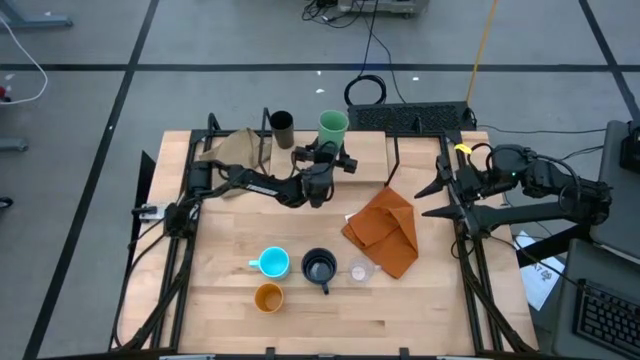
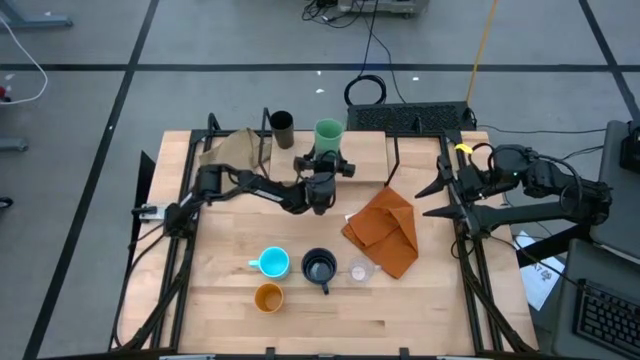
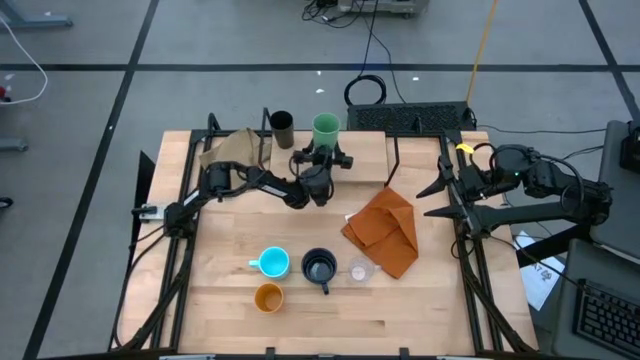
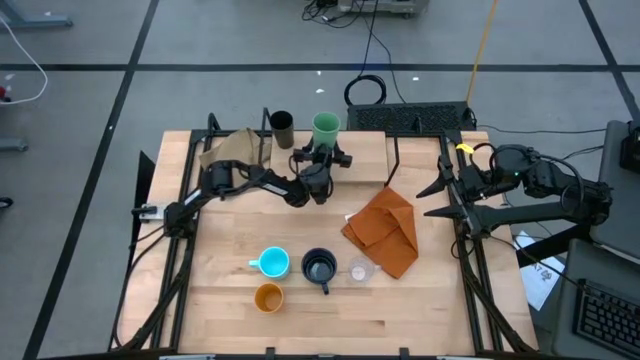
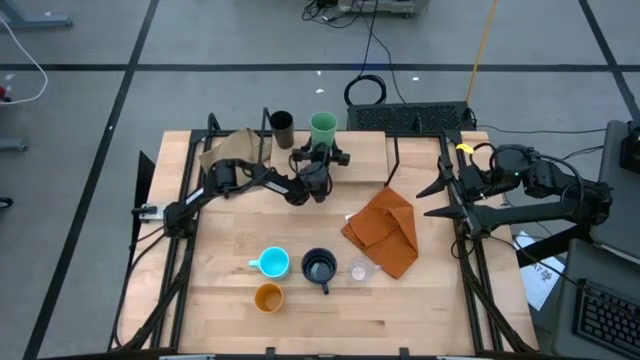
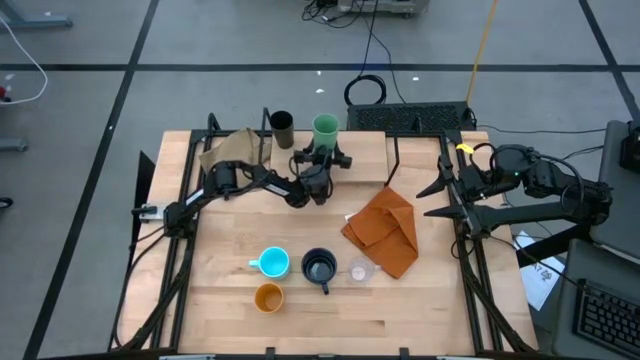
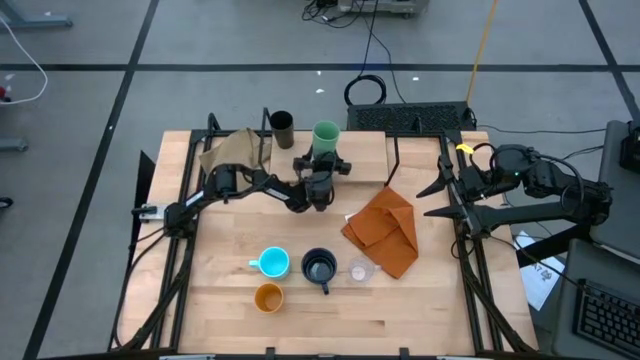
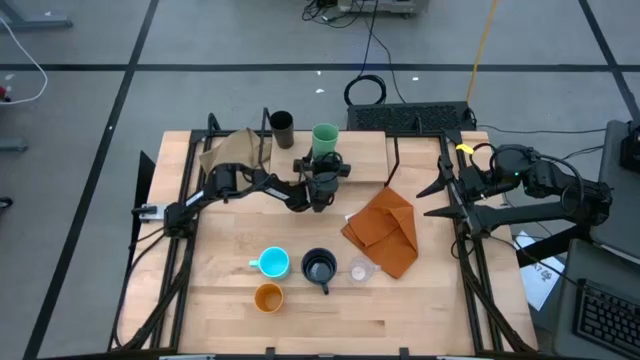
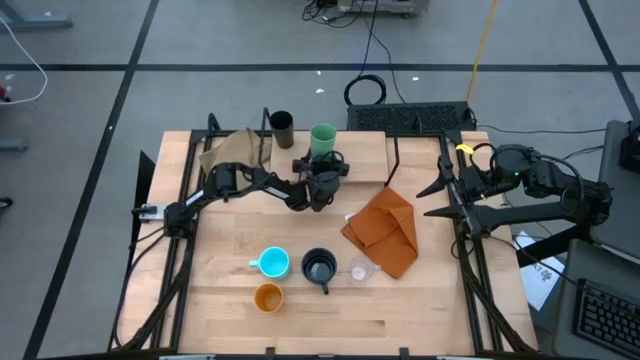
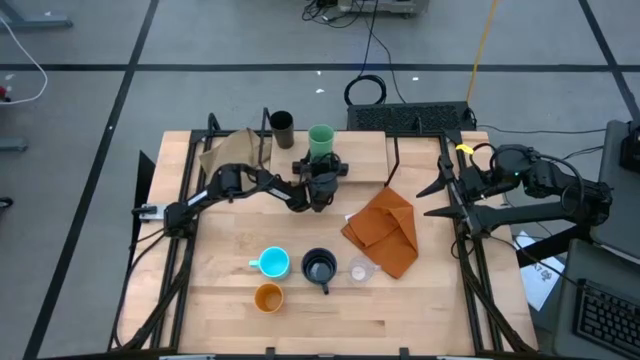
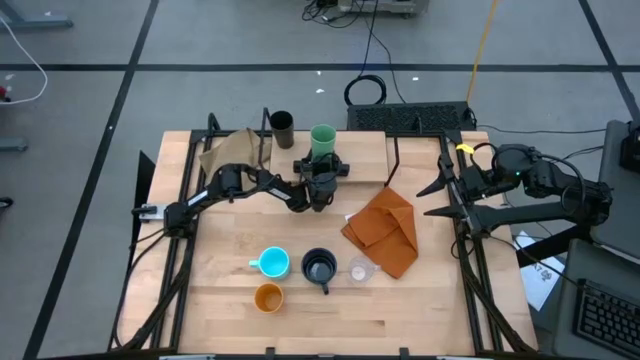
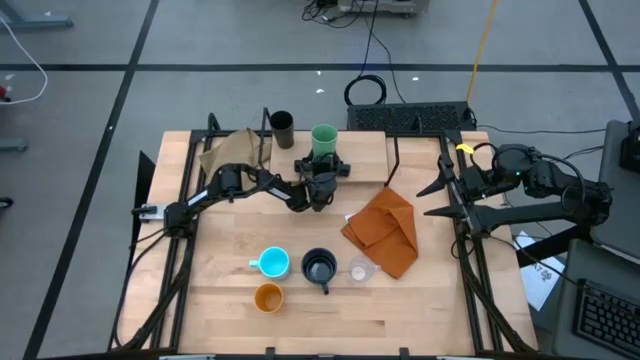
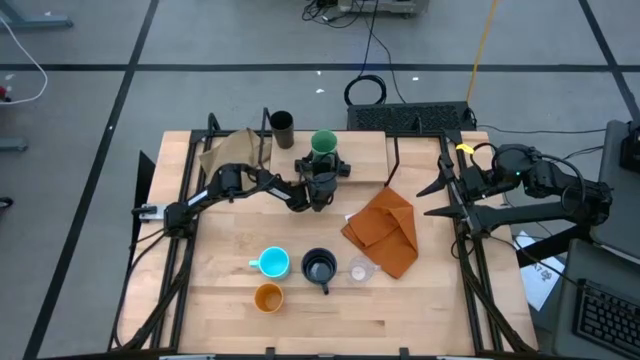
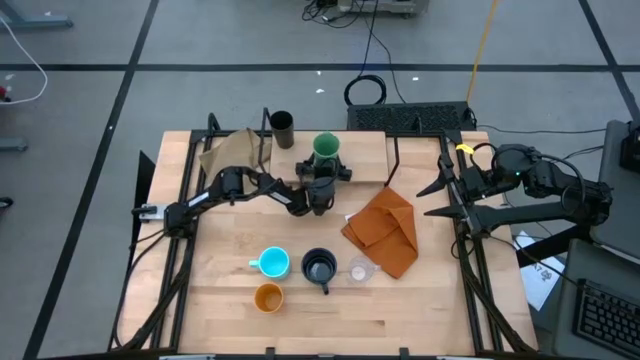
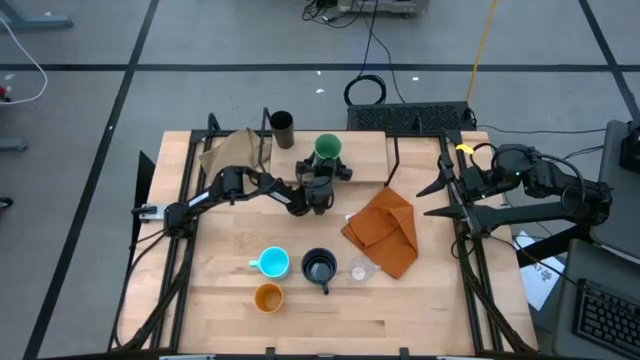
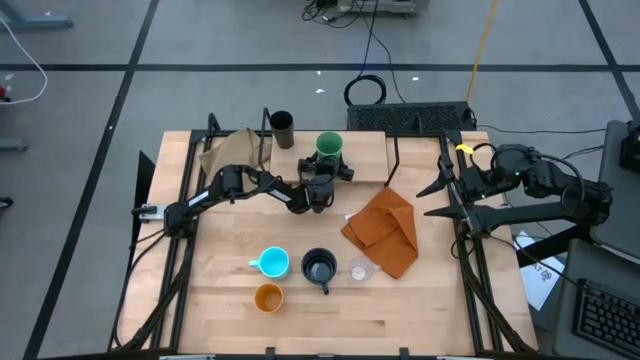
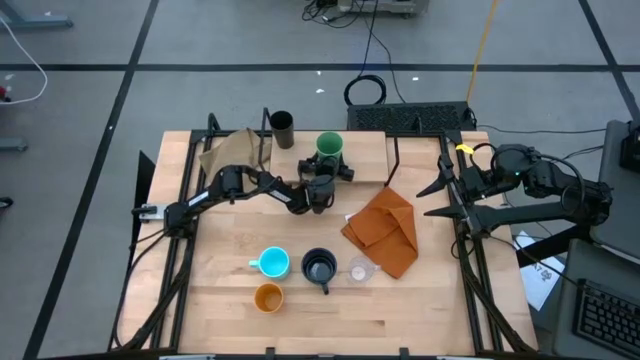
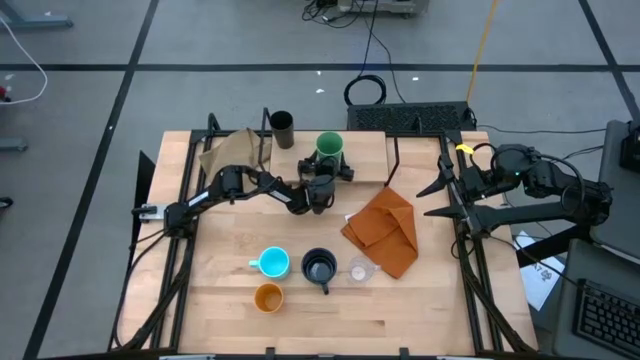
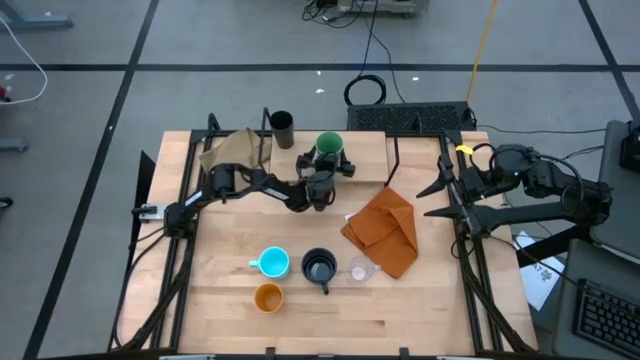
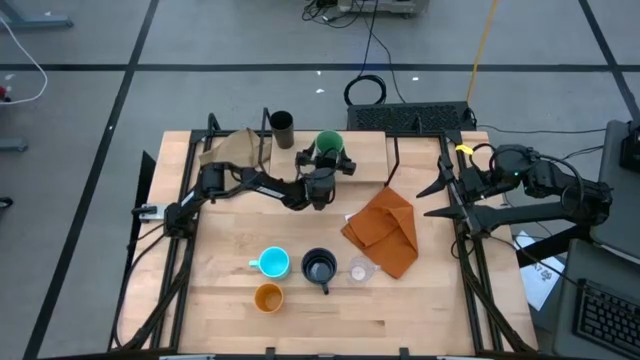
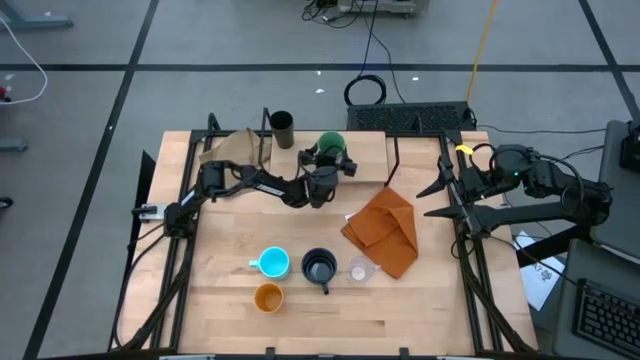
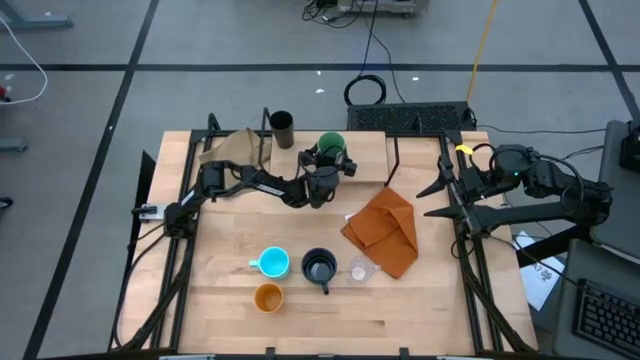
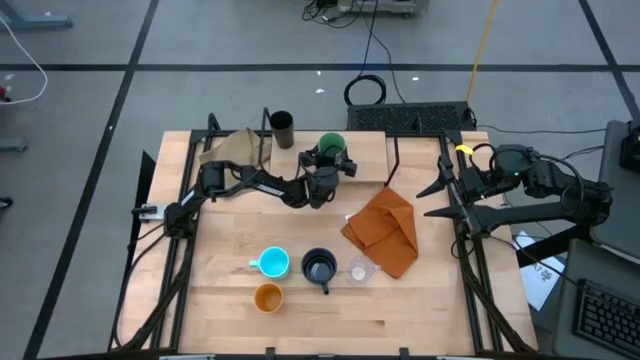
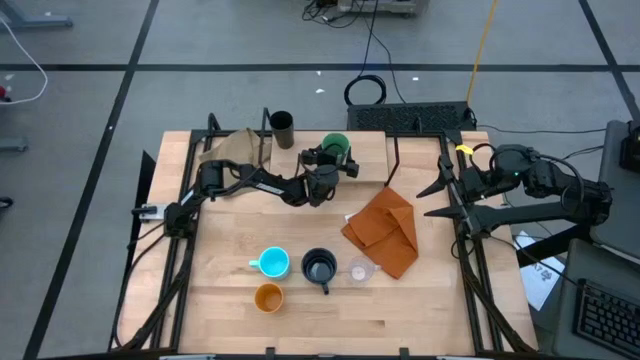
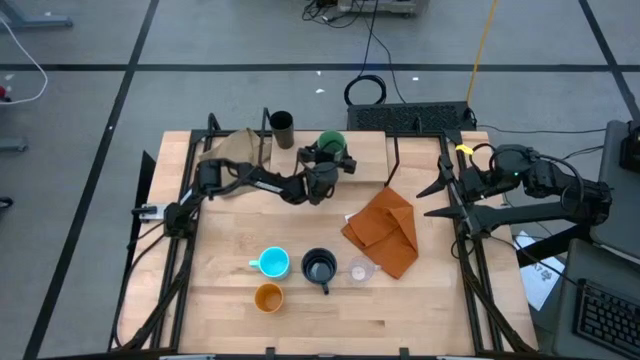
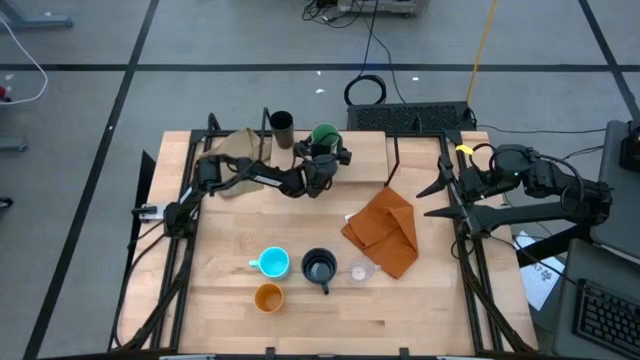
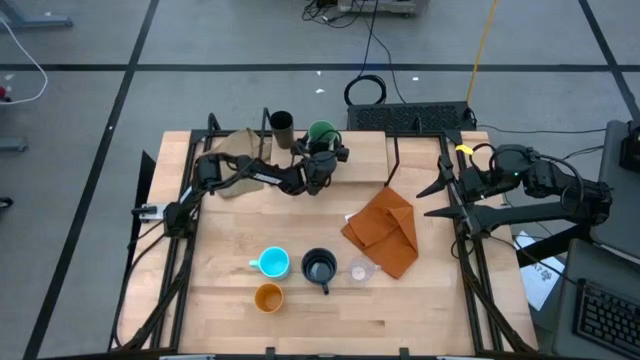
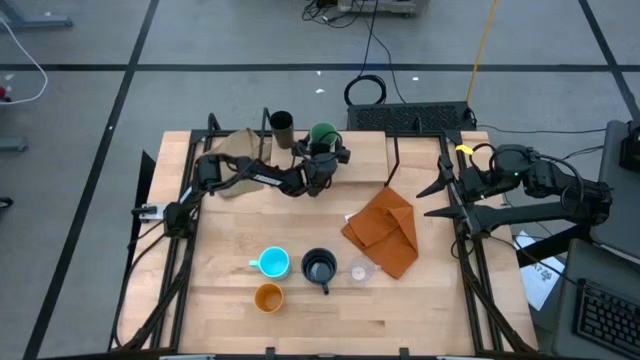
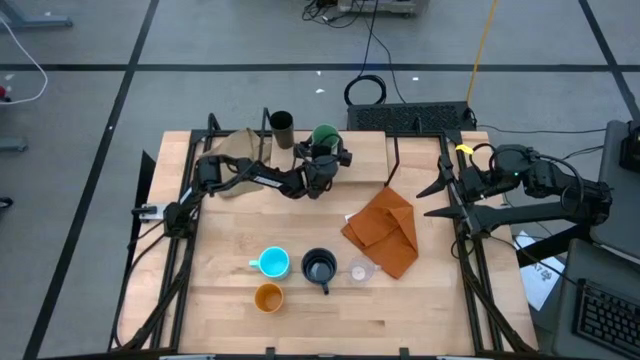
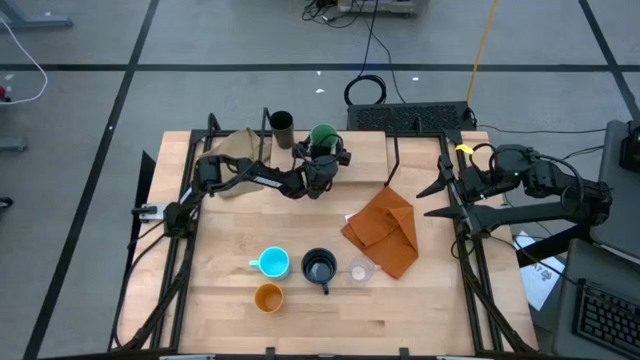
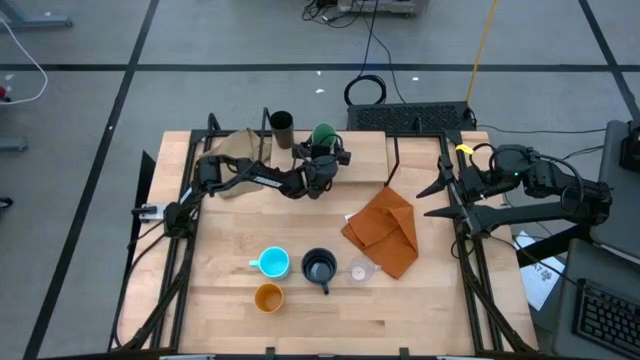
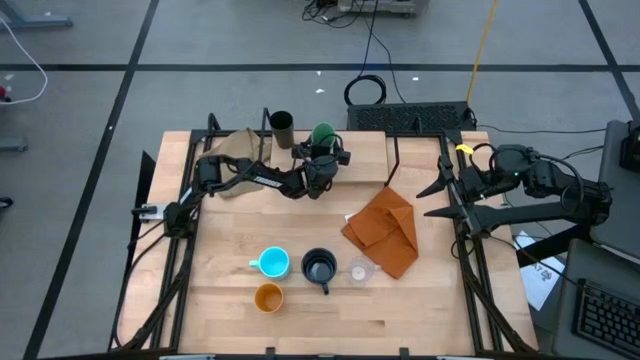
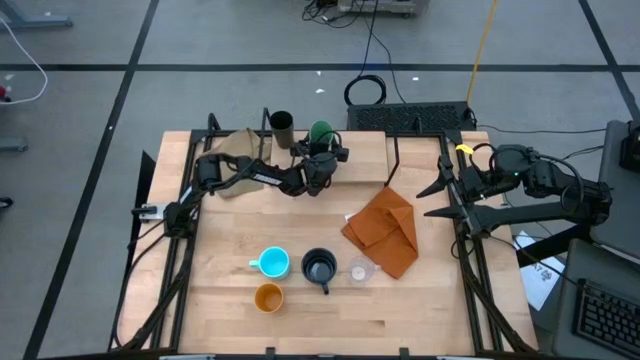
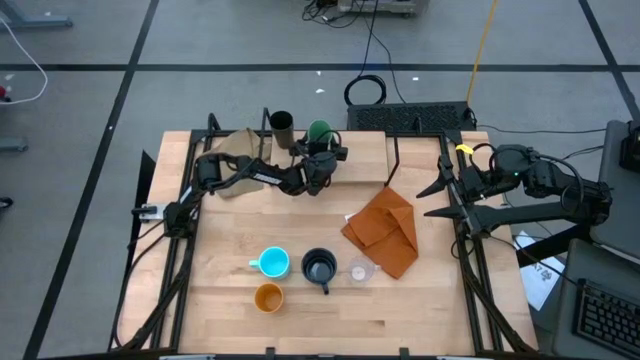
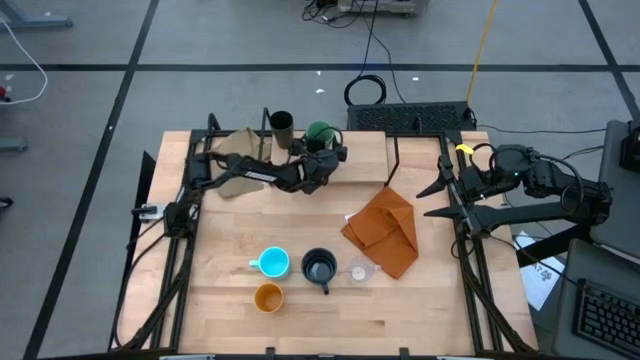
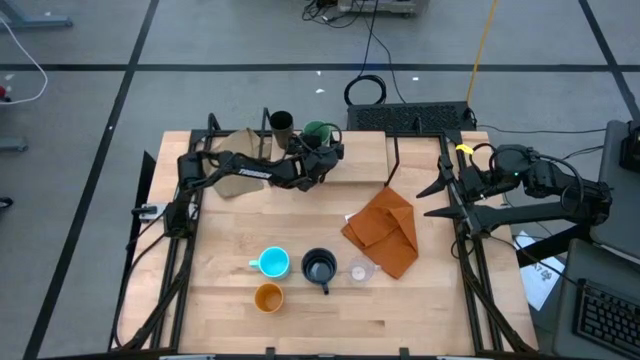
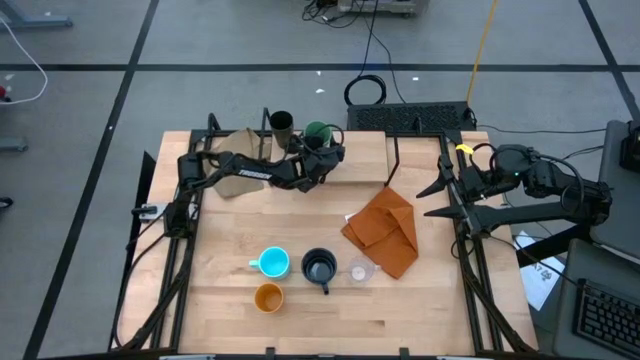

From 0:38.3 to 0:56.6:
Task: Stack small to large cups/mugs on shelf
Put the green cup on the shelf
